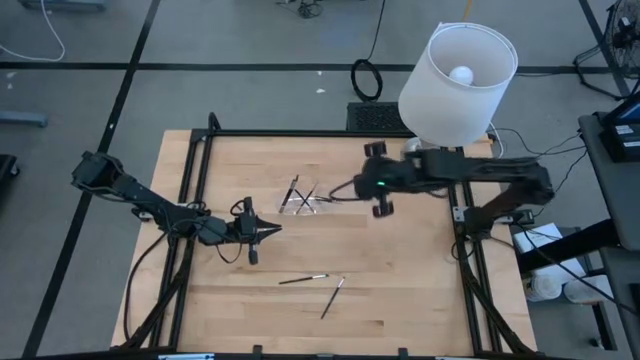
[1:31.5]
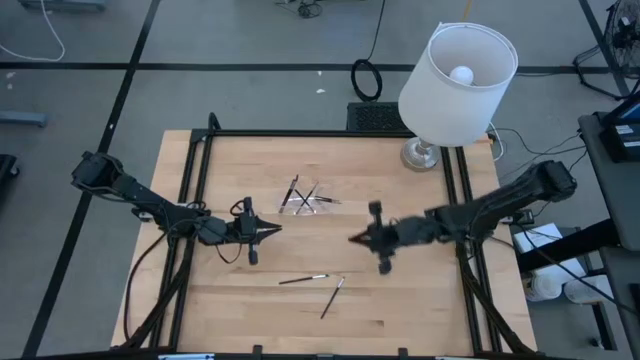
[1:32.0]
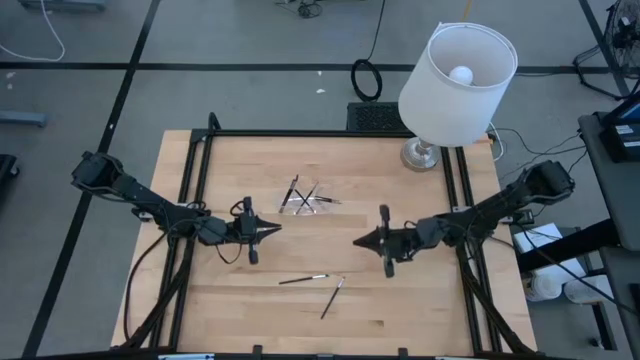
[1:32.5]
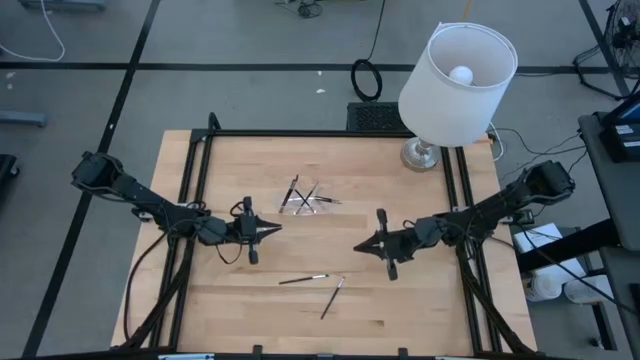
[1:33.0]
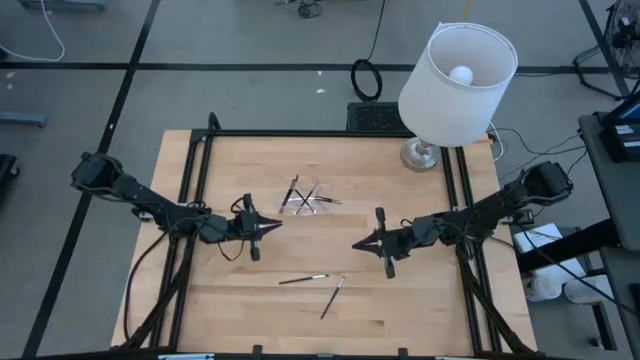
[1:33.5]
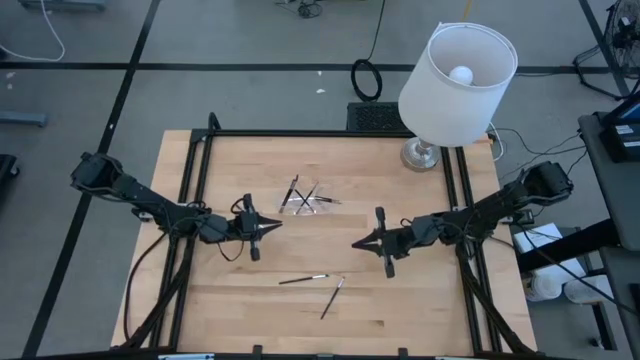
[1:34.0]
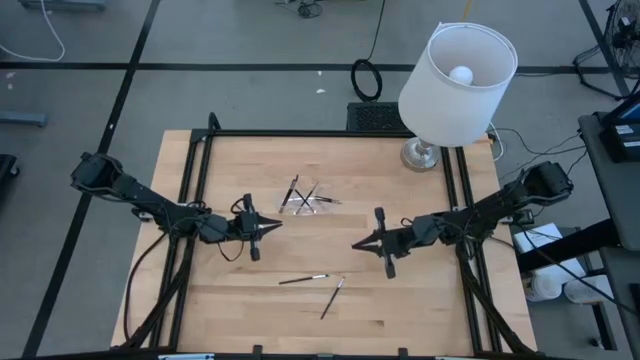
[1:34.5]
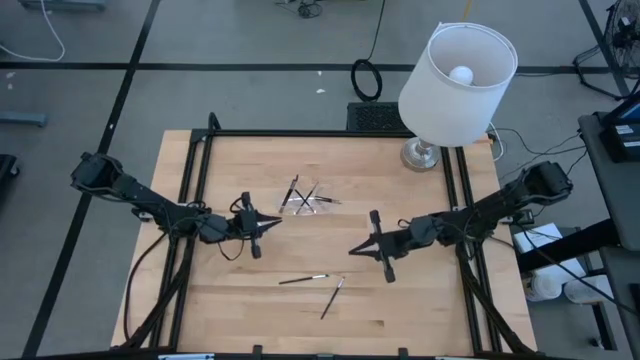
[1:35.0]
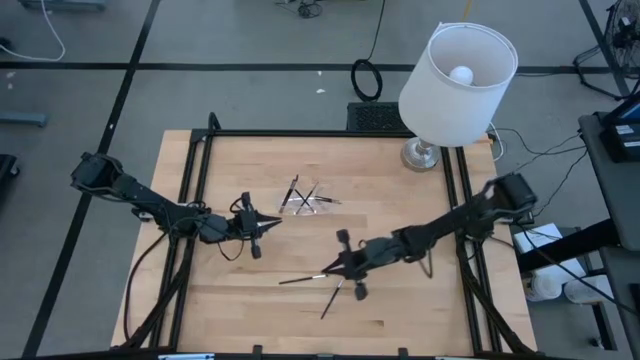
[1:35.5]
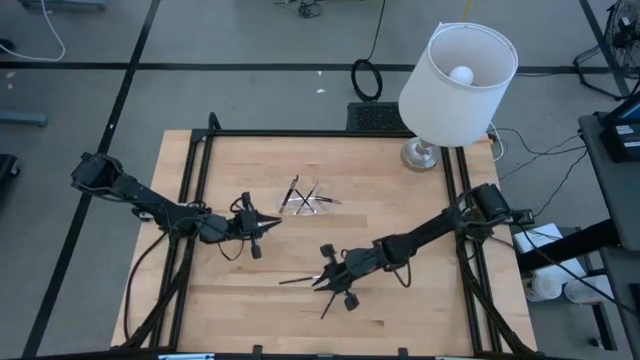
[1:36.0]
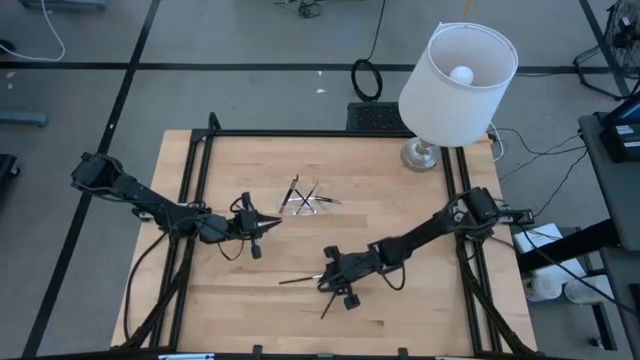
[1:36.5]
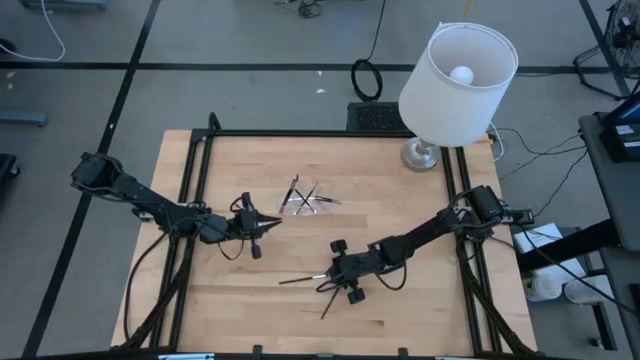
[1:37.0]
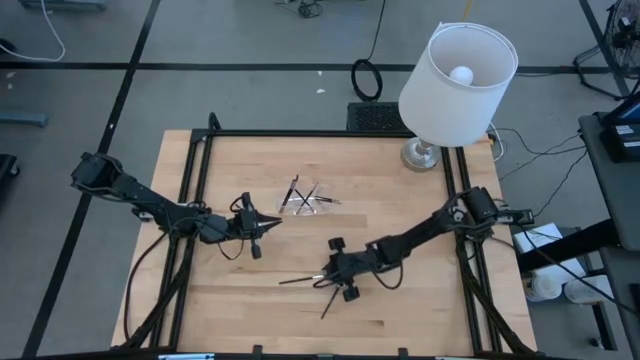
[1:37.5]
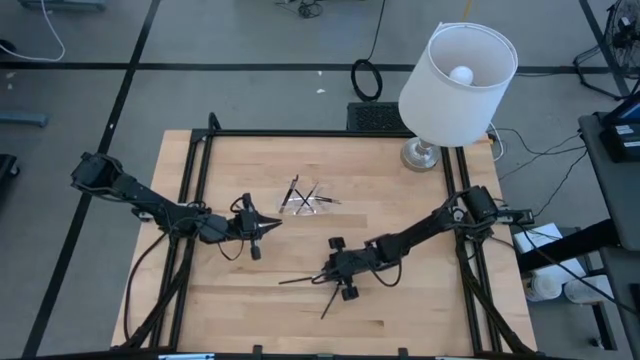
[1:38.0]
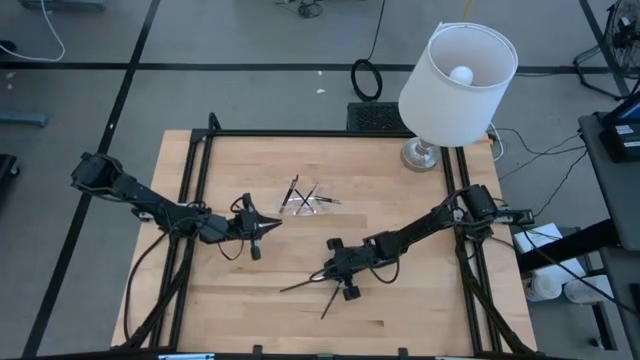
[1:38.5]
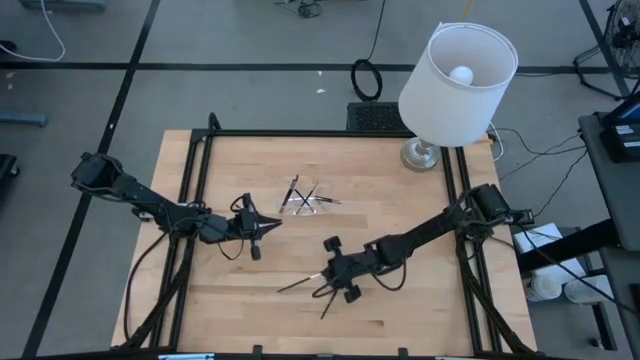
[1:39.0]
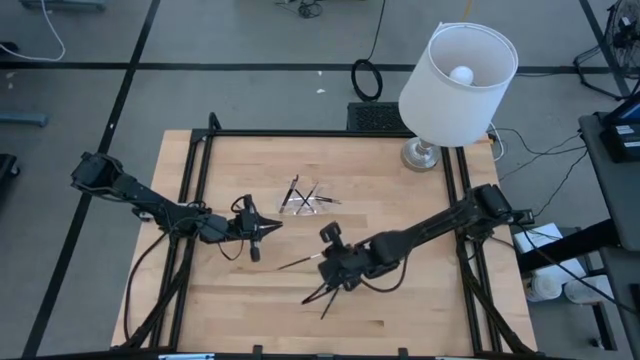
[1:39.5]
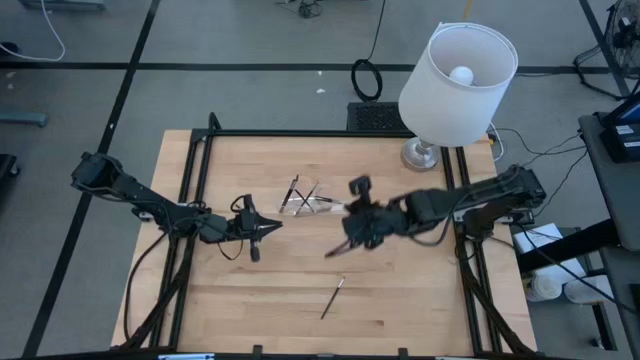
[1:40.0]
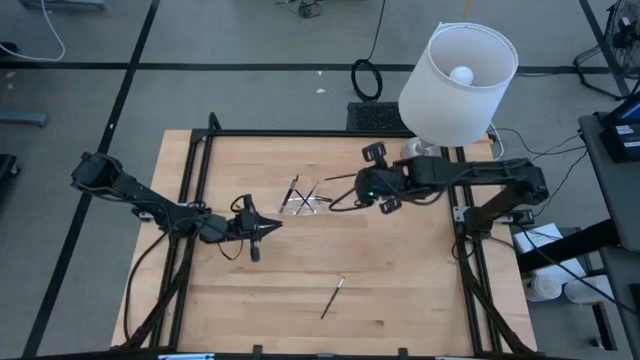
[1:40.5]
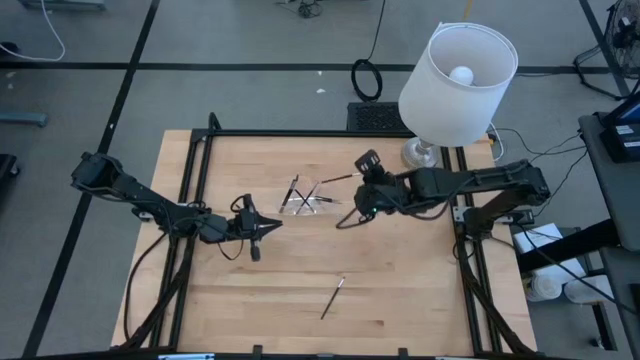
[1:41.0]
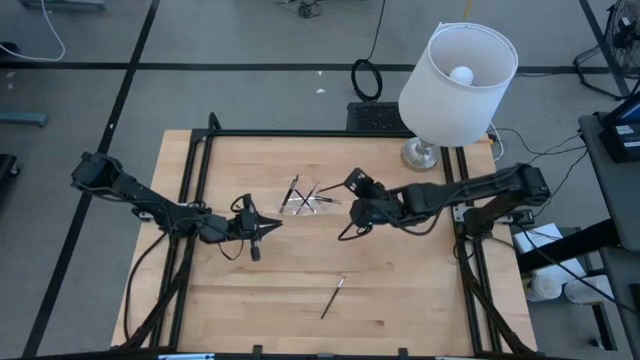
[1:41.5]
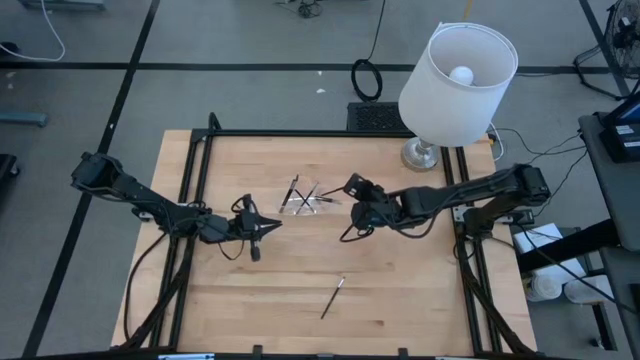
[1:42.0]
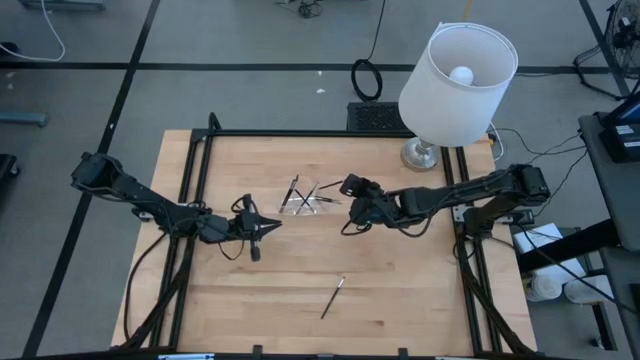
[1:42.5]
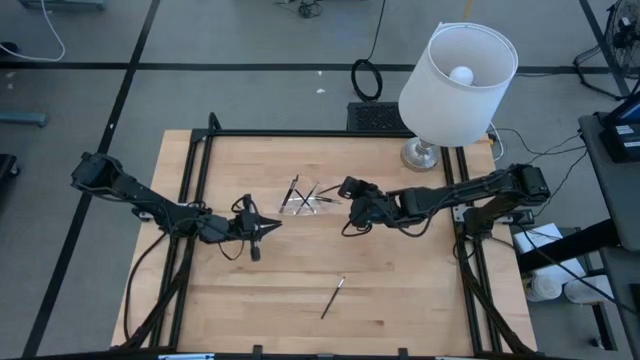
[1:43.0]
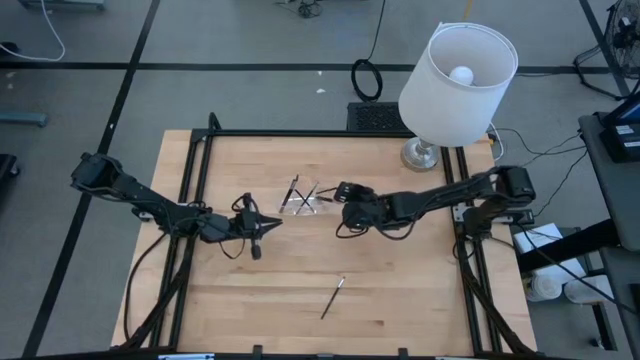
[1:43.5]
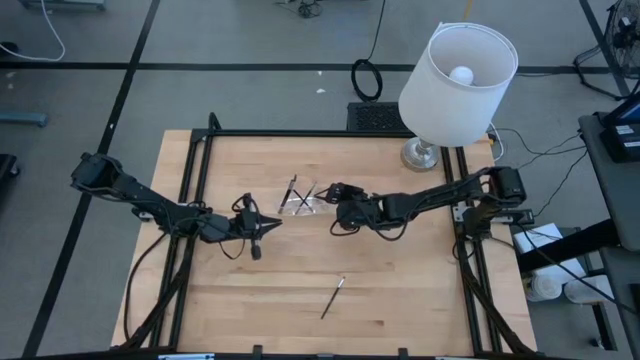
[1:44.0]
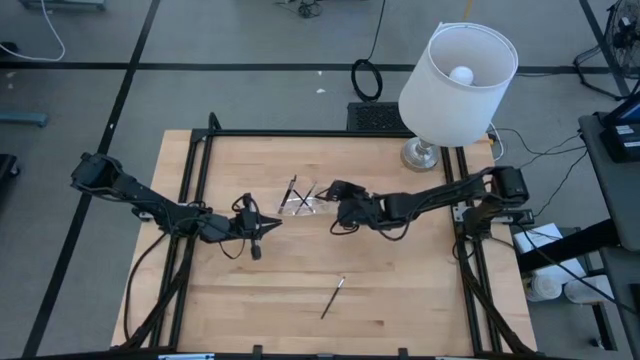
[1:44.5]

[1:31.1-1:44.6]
Task: Put items in baskets/containers
Put the black eyeshadow brush into the transparent organizer

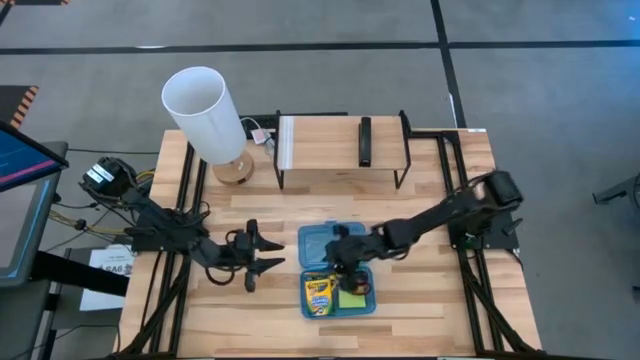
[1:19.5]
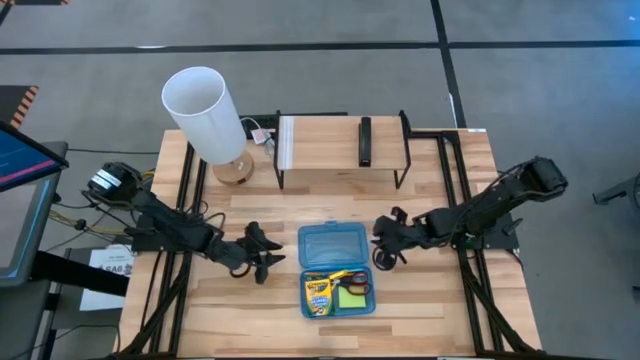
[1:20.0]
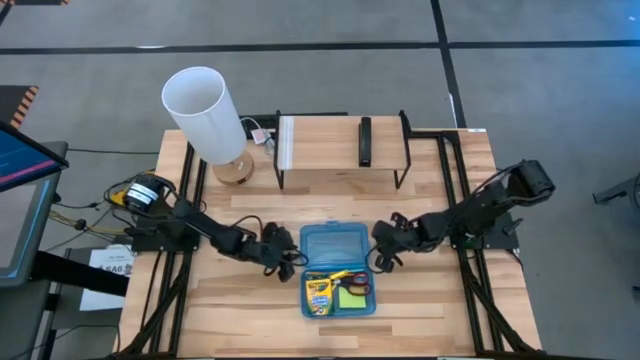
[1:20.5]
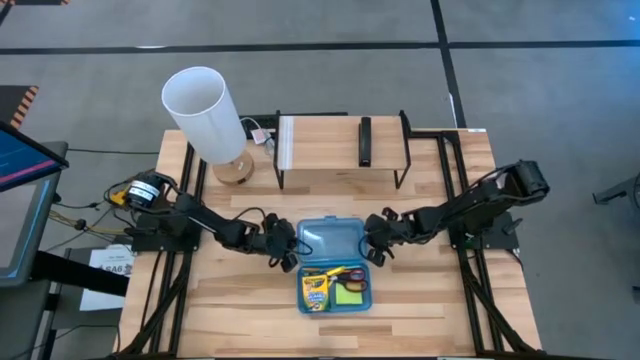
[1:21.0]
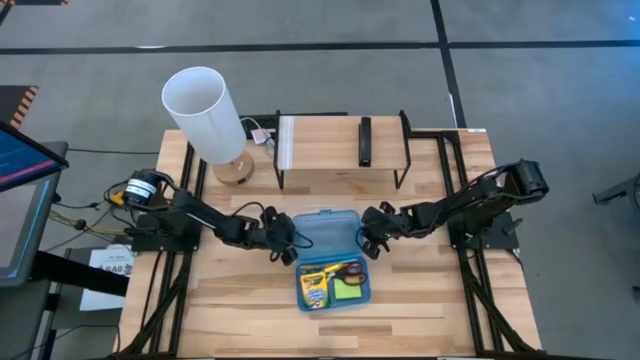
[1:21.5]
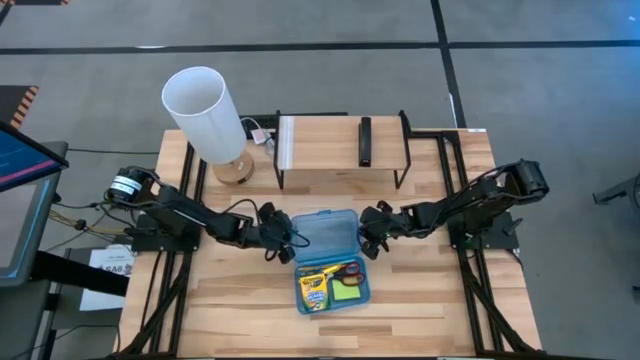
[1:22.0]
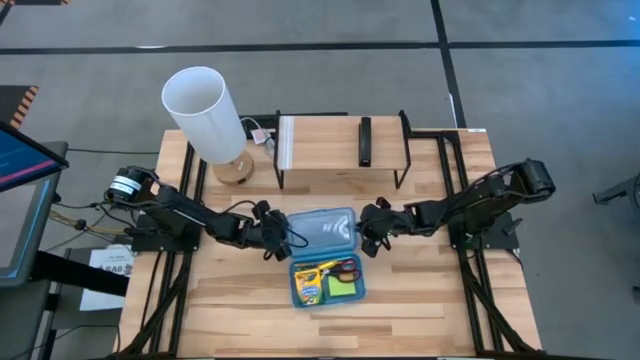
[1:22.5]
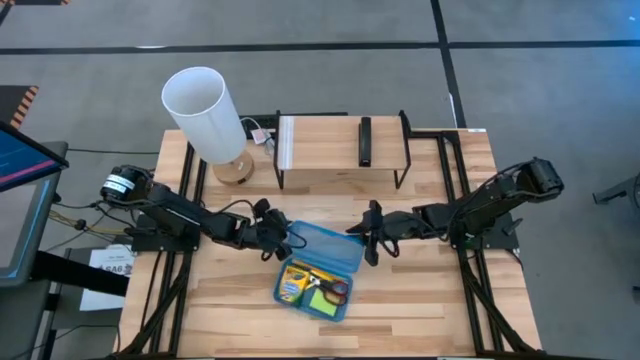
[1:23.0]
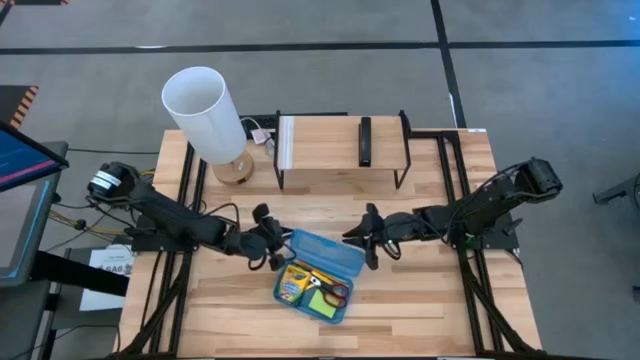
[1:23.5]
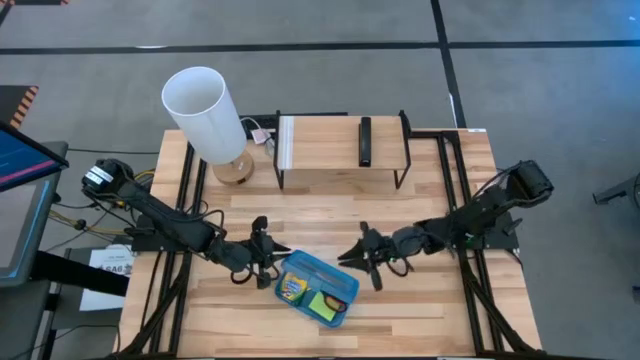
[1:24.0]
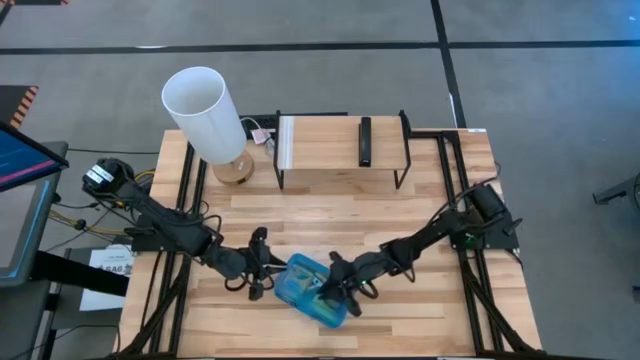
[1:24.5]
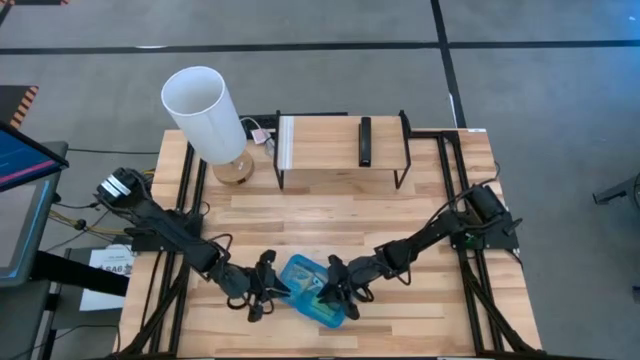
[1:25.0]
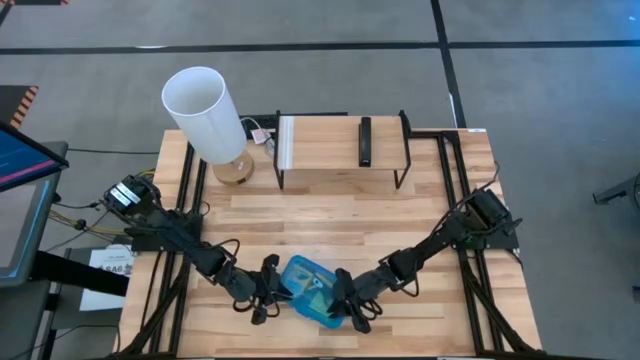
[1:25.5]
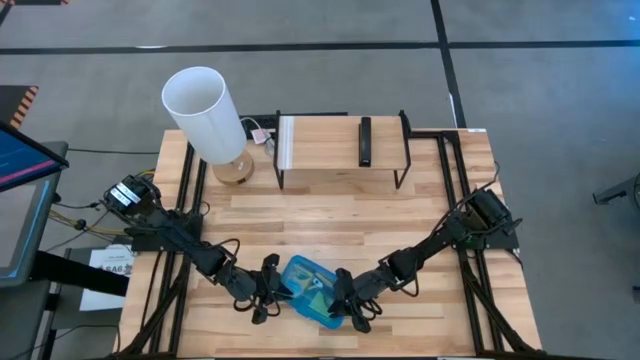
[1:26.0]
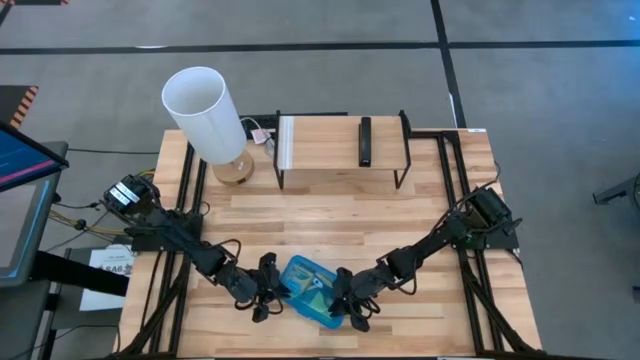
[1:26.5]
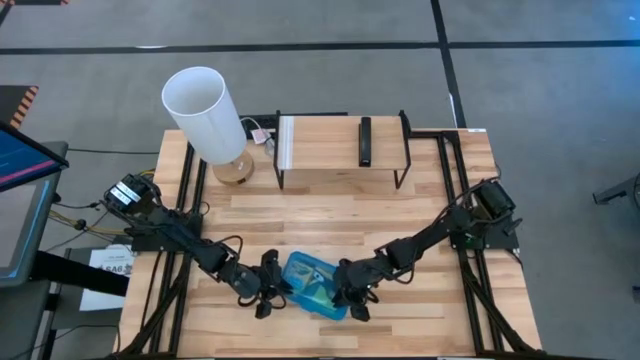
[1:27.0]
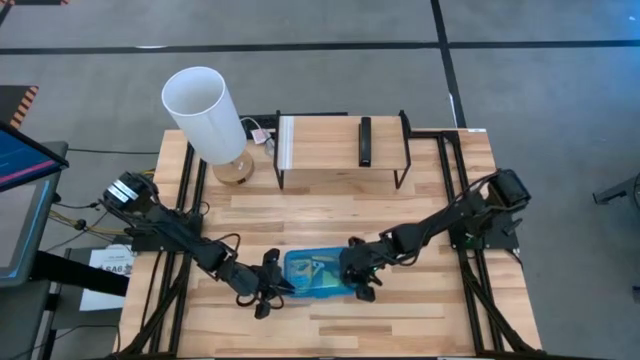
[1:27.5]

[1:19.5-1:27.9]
Task: Pack school essentials
Close the blue supply box
